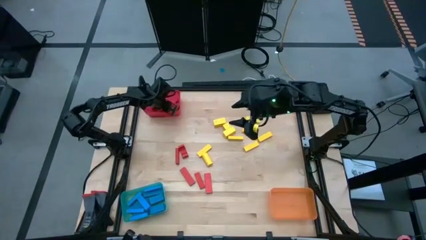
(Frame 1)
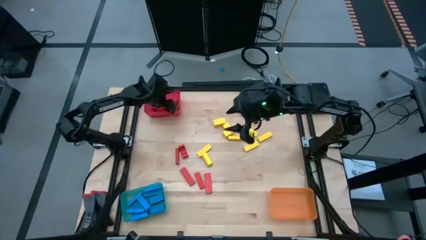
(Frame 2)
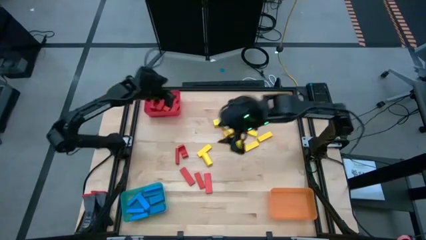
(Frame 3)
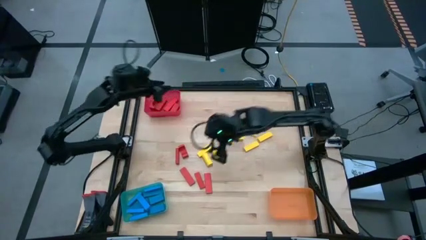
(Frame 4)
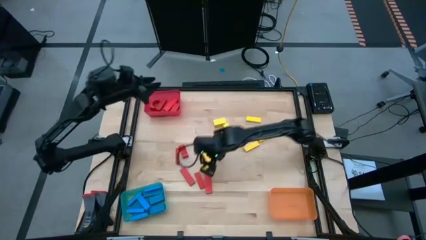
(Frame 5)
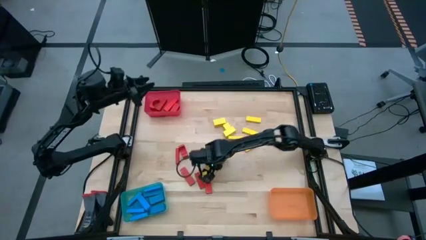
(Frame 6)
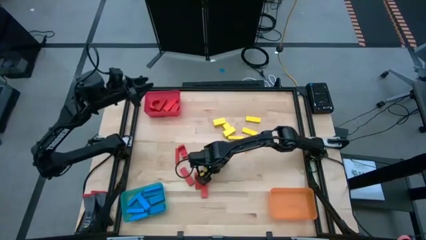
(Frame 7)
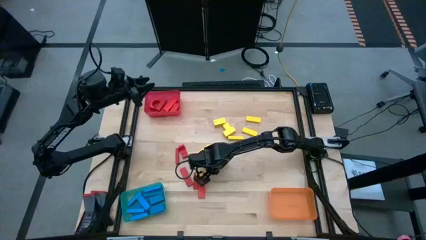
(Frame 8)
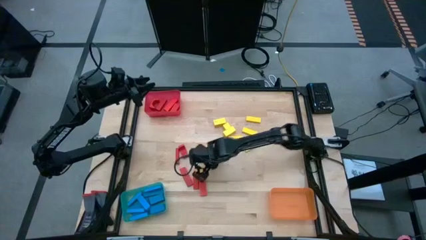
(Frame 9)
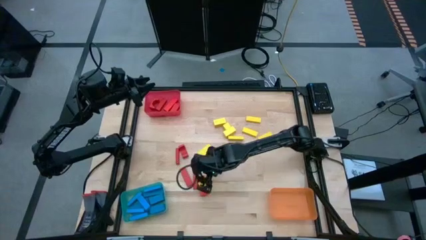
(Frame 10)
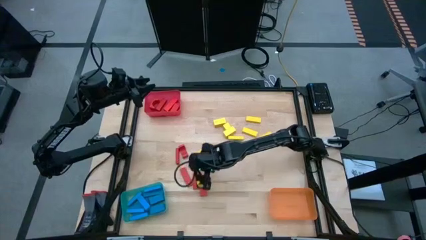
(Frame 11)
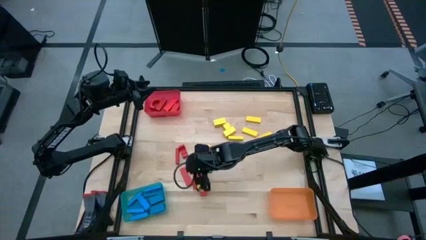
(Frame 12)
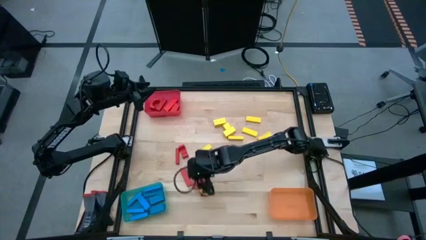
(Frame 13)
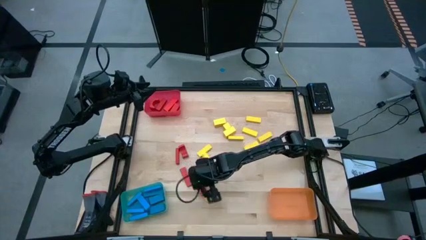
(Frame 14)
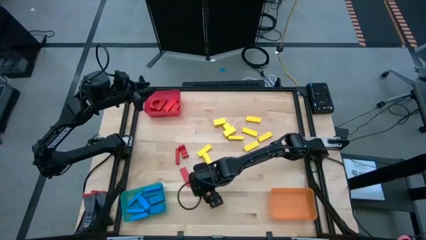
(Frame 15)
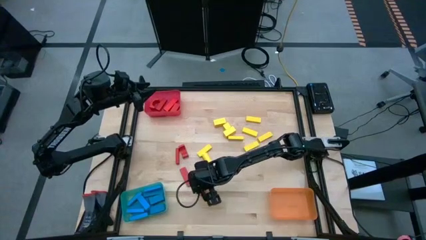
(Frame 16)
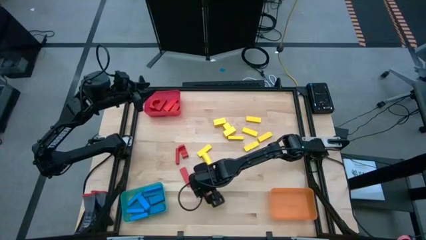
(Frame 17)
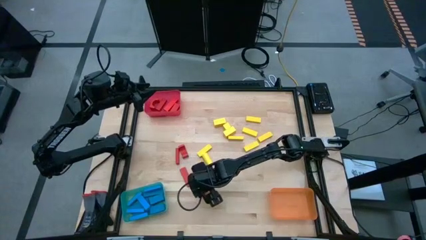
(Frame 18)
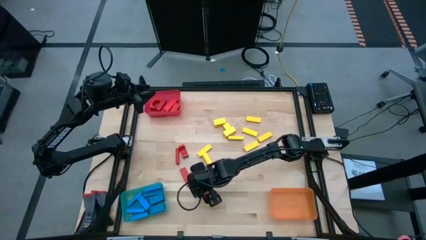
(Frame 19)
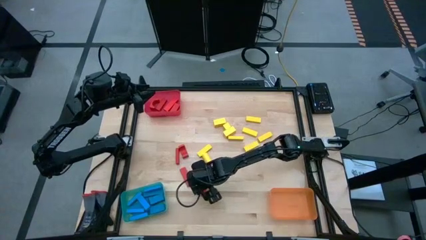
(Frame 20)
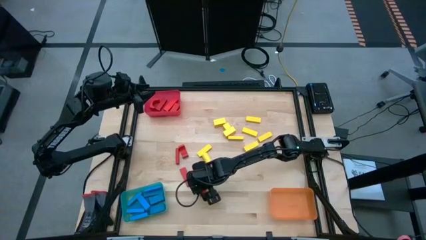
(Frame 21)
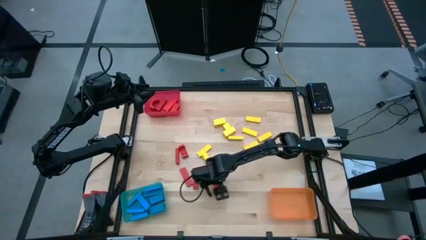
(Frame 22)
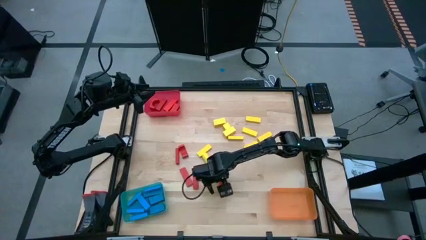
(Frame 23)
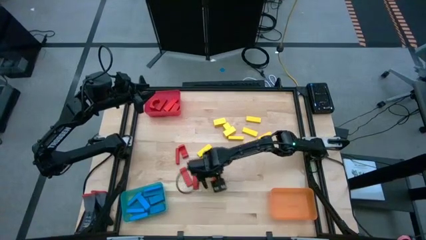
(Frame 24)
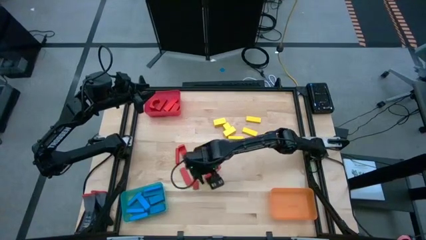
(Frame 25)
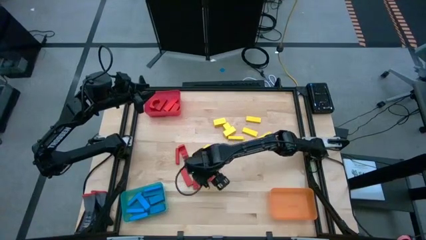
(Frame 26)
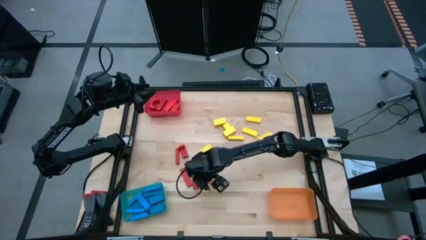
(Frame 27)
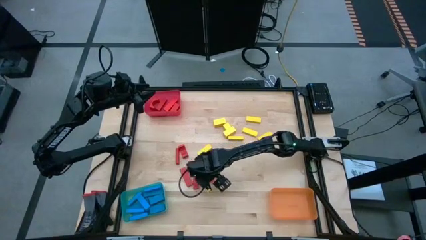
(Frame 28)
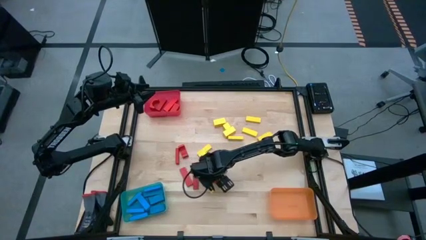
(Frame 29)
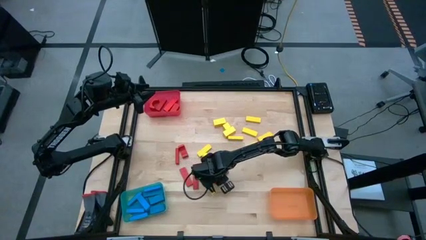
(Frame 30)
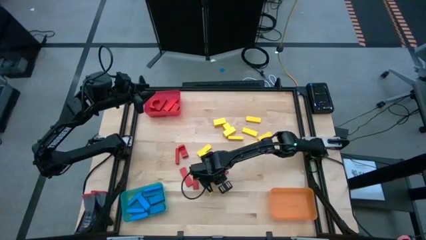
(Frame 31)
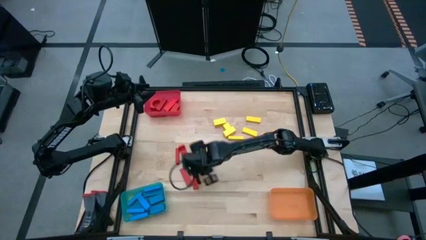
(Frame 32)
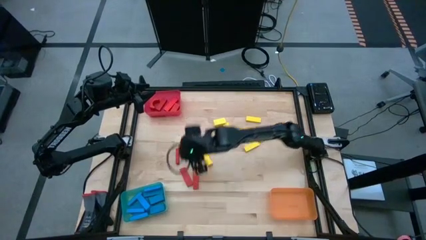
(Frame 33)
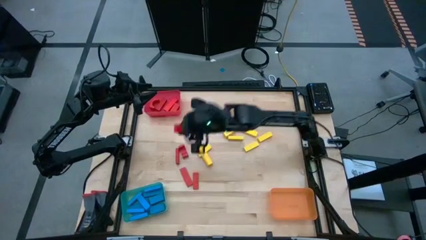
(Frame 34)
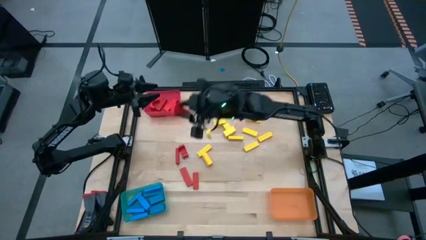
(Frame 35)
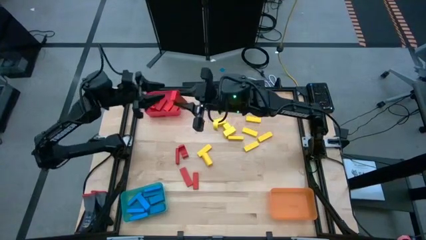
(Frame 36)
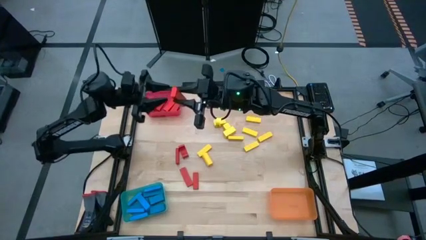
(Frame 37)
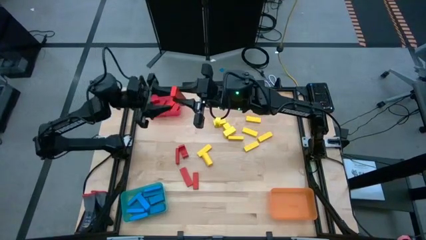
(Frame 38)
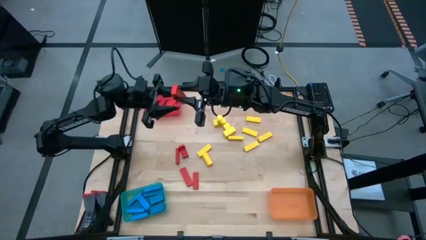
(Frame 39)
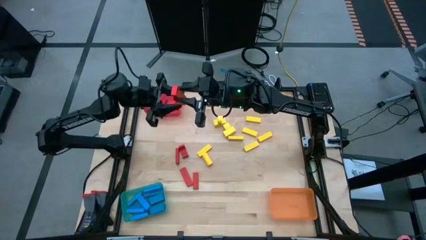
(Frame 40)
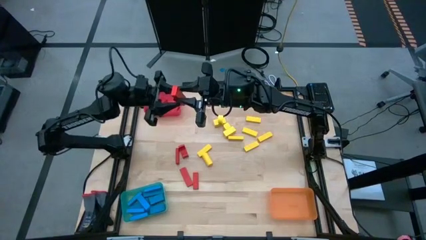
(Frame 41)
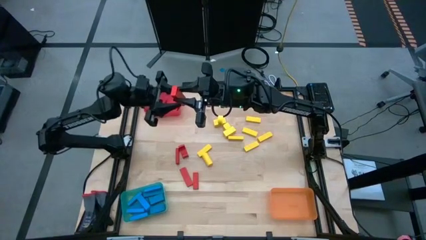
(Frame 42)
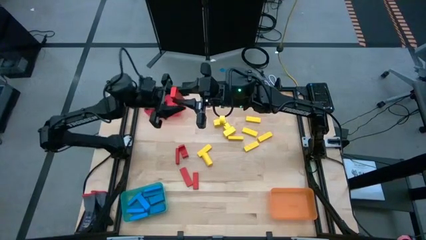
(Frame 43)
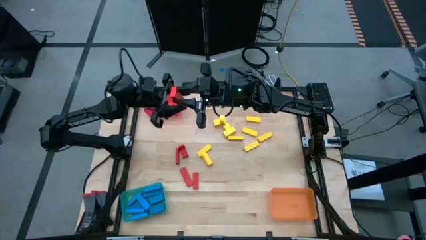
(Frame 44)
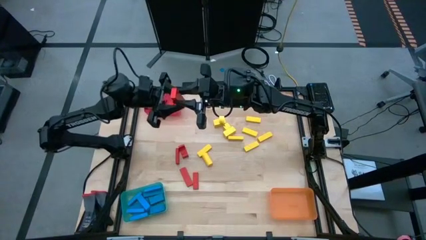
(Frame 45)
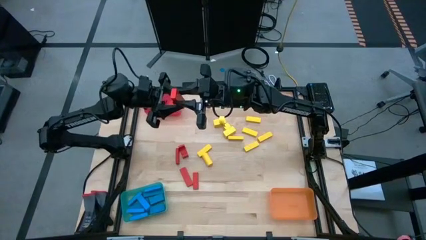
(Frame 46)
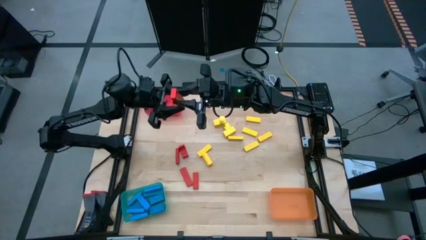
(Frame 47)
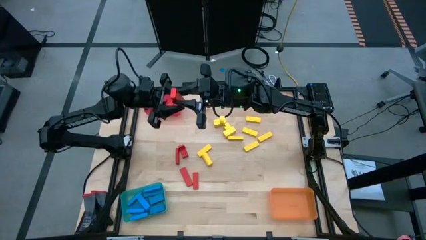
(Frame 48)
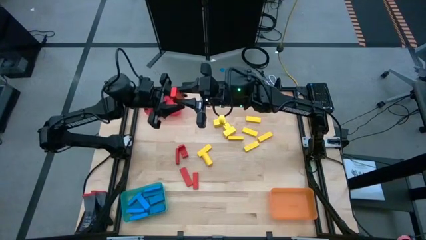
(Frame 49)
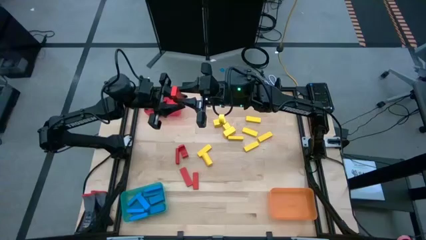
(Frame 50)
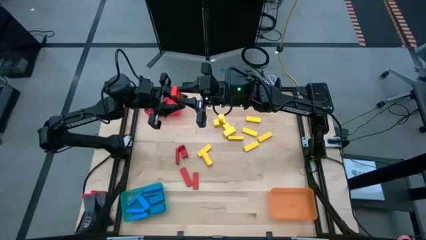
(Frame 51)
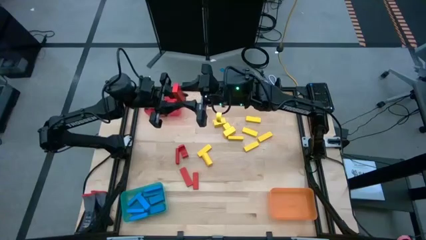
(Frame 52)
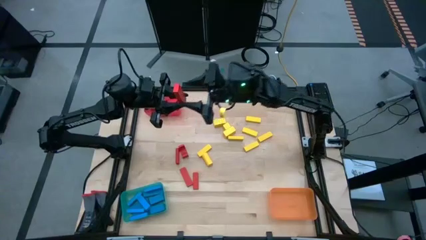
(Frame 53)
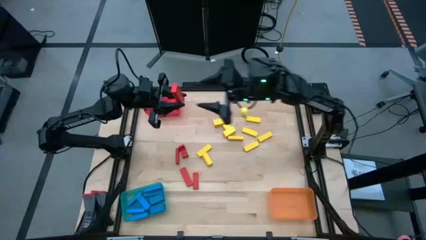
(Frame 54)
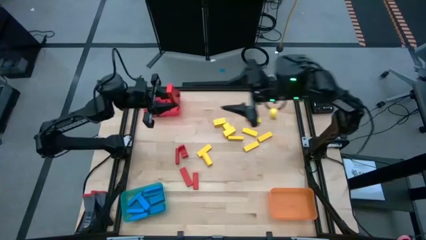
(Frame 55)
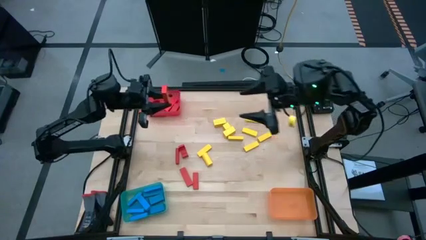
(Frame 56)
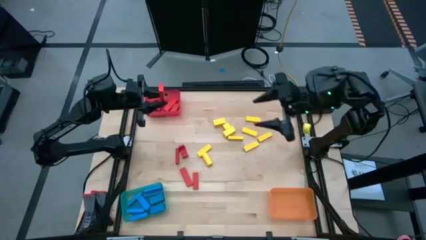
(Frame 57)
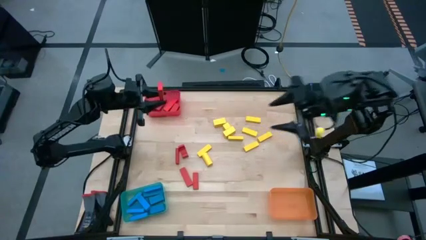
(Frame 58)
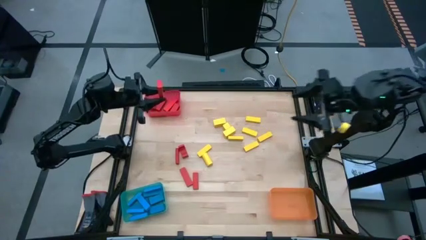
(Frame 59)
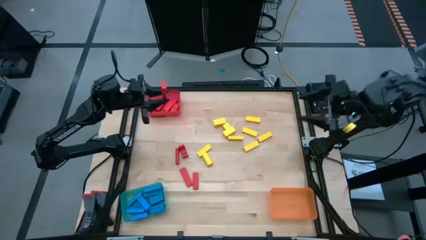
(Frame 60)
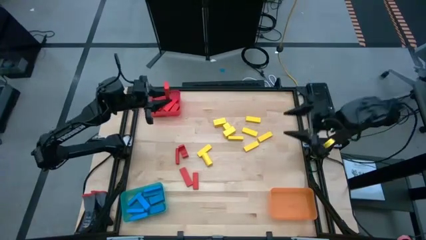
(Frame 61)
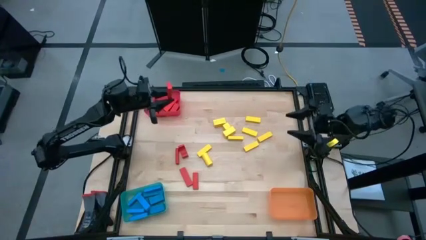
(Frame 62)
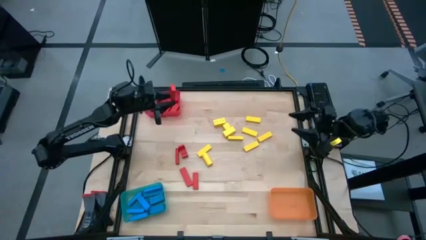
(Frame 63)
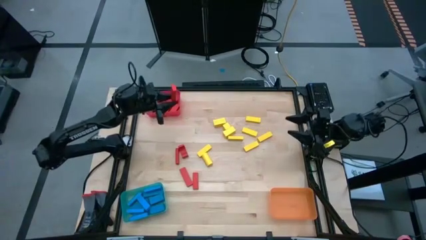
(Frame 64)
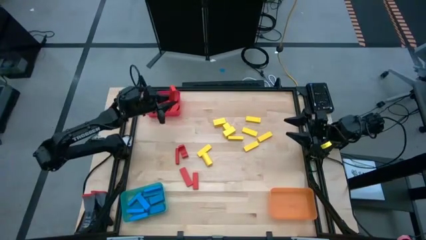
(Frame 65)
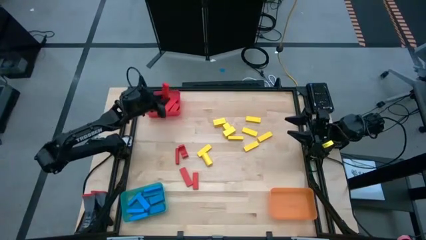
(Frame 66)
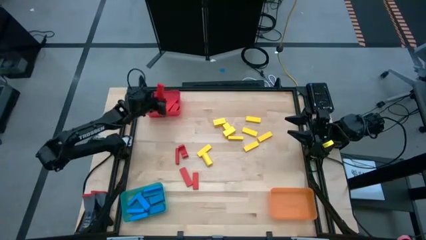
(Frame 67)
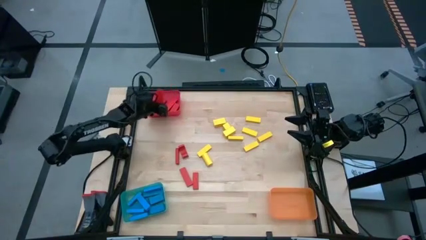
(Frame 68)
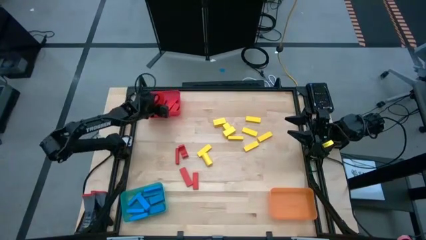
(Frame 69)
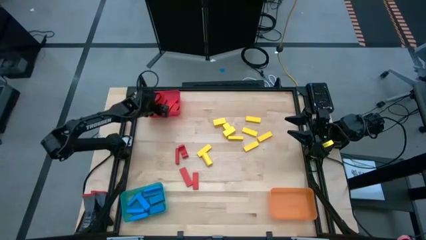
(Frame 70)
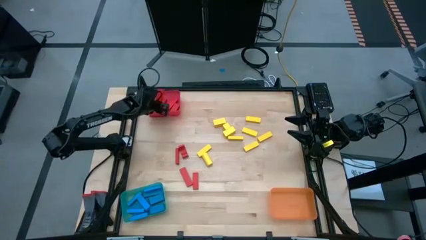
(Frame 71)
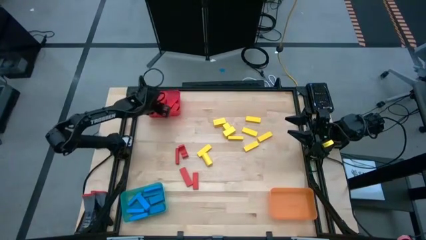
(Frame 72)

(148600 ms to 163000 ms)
Task: Sort blocks
Put the red block into the red bin

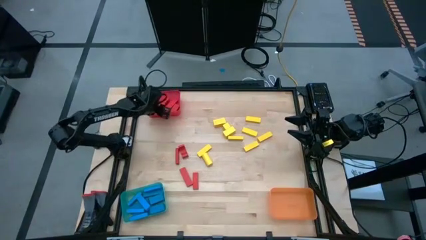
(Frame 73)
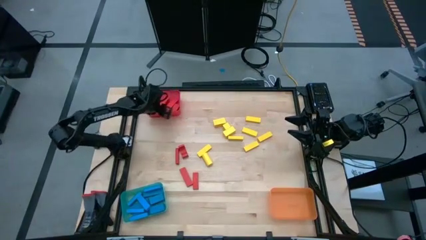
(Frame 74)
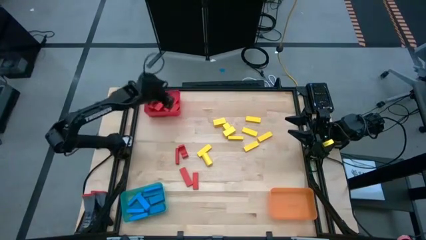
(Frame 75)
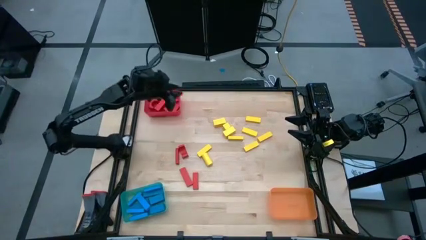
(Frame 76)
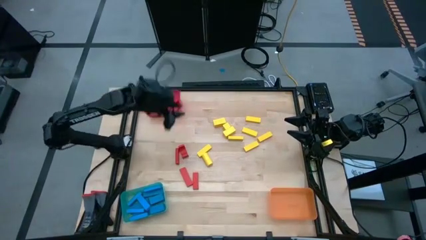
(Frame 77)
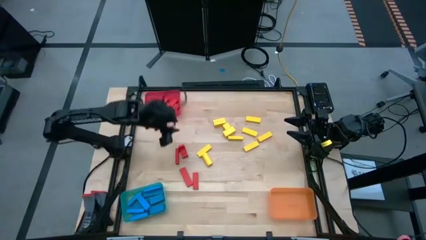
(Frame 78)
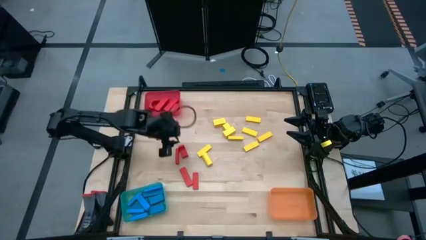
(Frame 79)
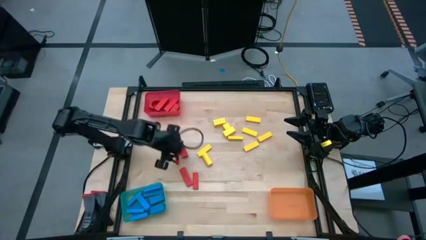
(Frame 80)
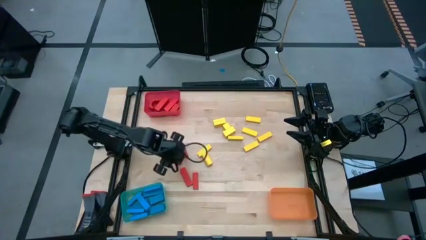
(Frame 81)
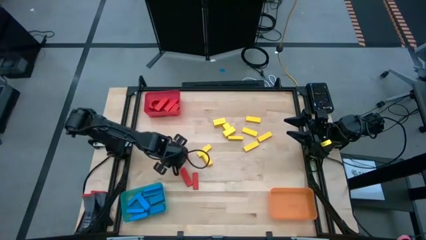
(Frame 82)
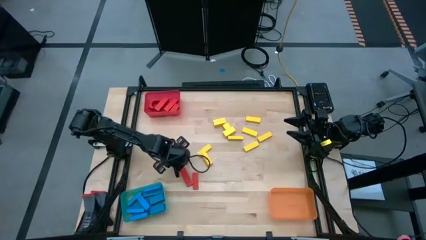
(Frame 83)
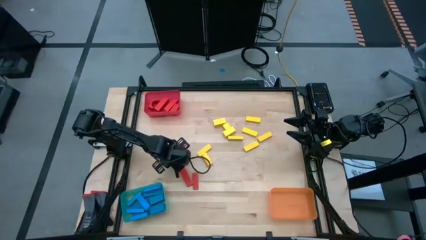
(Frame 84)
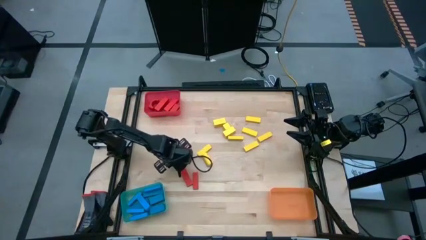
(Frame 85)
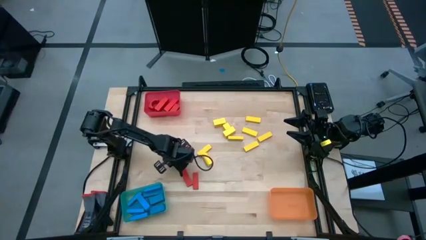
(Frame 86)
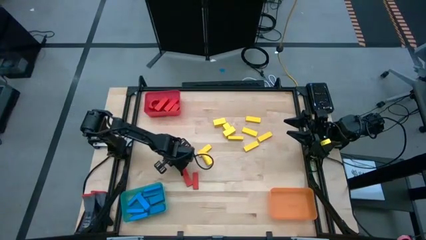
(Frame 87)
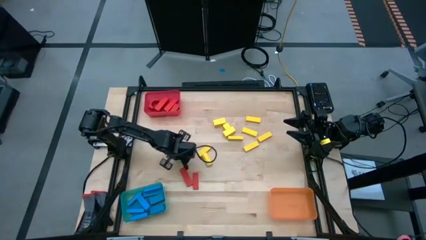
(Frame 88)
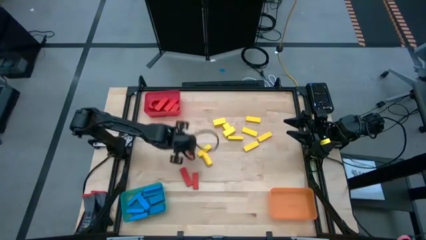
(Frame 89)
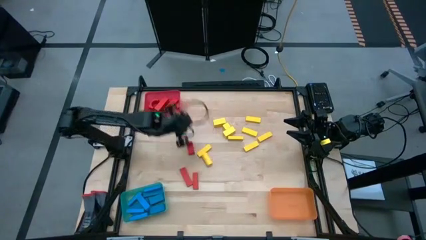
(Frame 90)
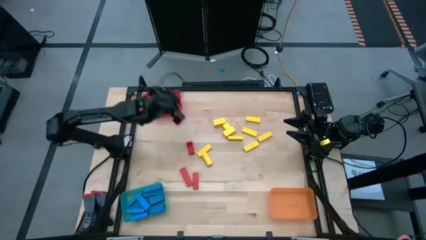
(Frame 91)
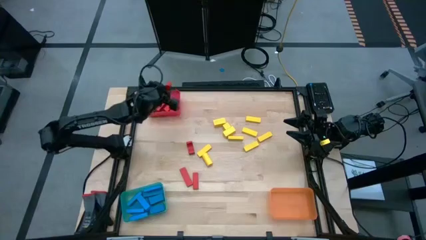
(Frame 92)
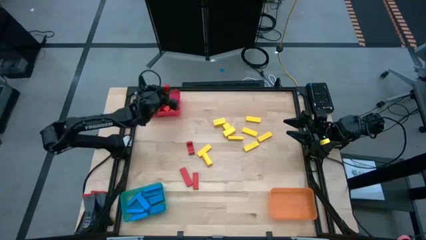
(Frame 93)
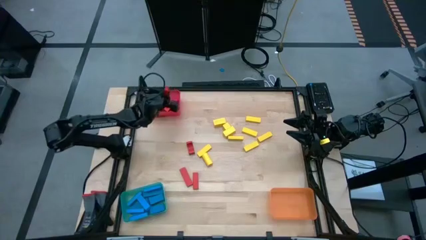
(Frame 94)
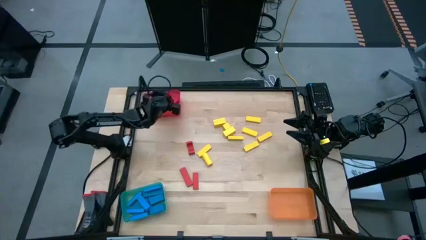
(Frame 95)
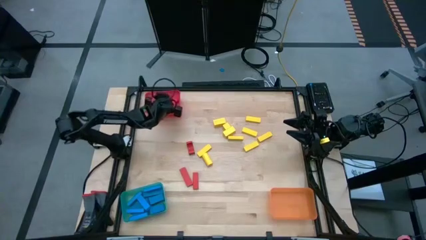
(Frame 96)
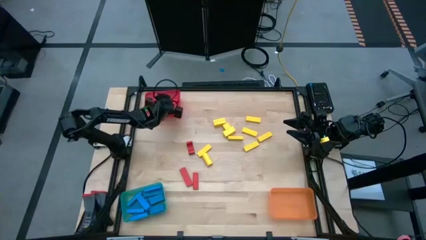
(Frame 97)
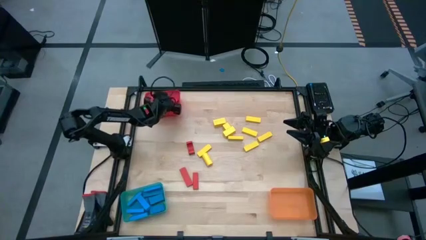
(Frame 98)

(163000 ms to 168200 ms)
Put the red block into the red bin
